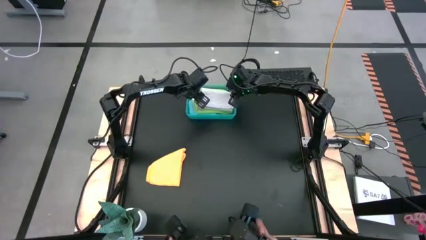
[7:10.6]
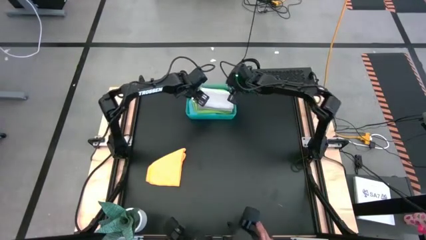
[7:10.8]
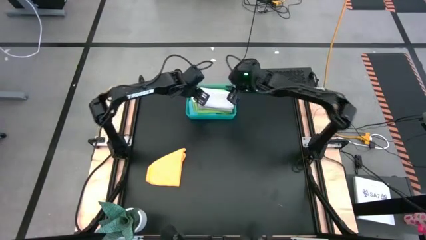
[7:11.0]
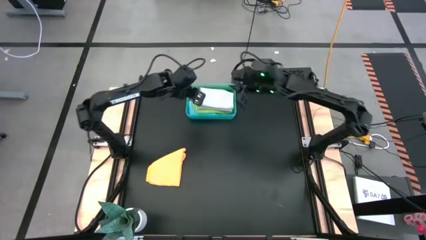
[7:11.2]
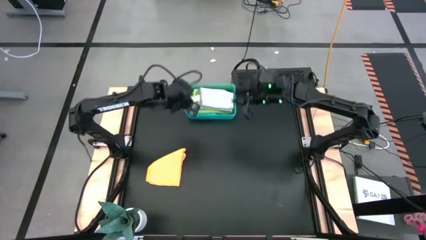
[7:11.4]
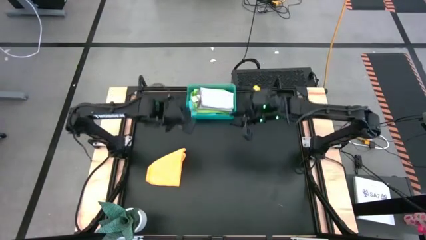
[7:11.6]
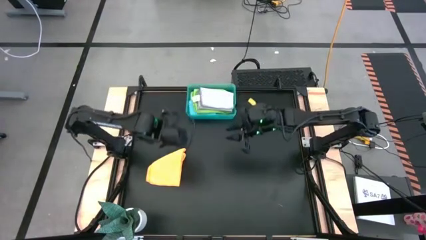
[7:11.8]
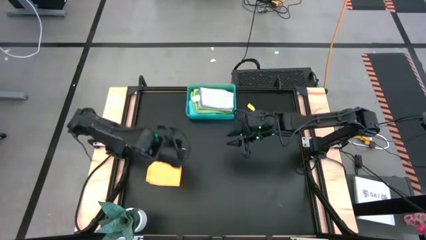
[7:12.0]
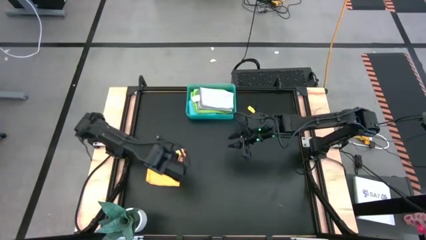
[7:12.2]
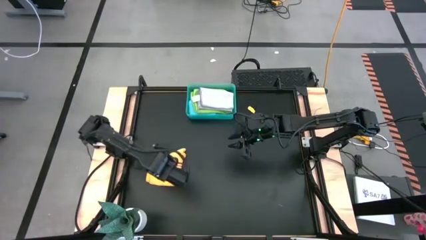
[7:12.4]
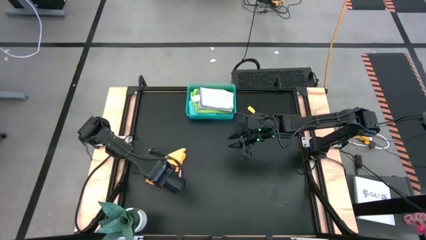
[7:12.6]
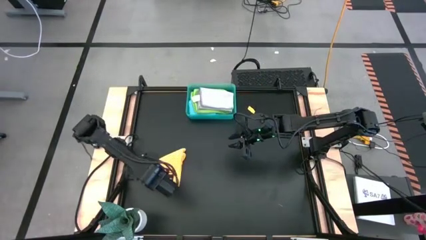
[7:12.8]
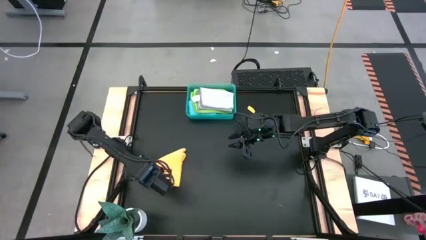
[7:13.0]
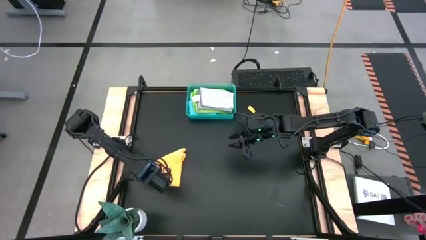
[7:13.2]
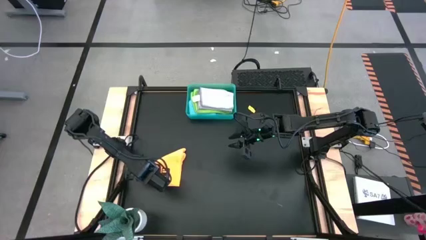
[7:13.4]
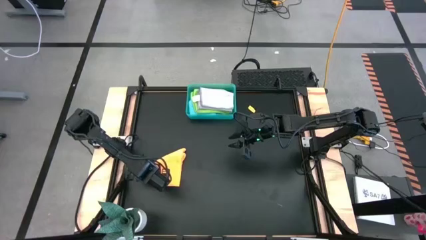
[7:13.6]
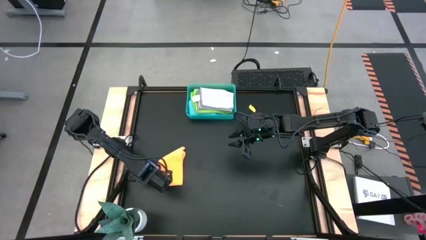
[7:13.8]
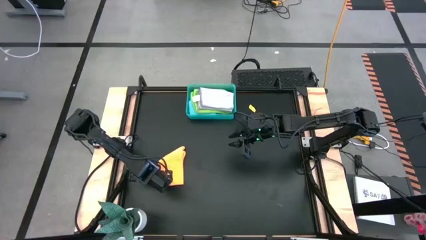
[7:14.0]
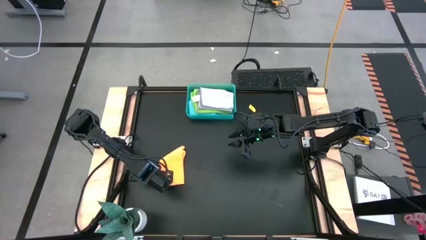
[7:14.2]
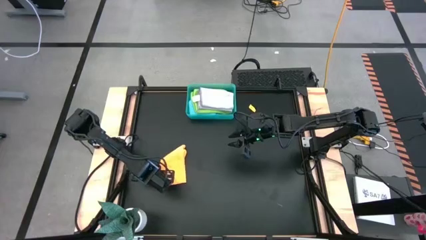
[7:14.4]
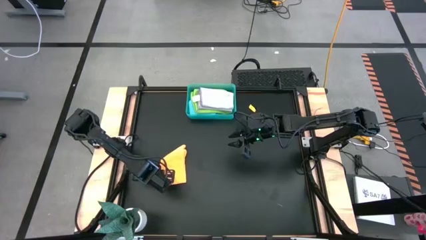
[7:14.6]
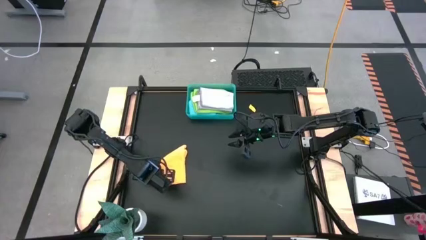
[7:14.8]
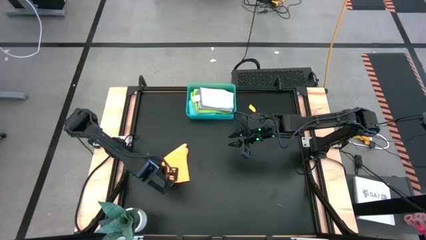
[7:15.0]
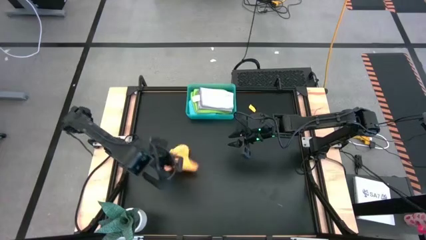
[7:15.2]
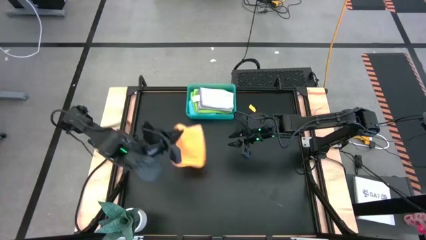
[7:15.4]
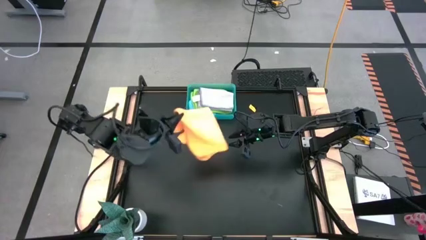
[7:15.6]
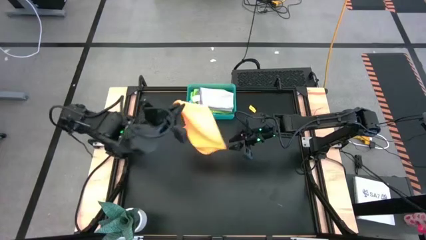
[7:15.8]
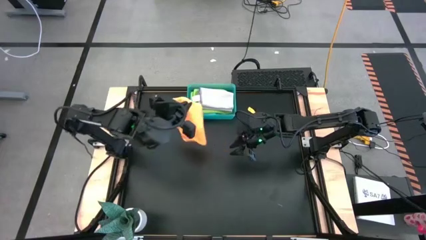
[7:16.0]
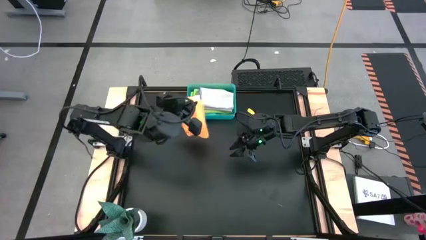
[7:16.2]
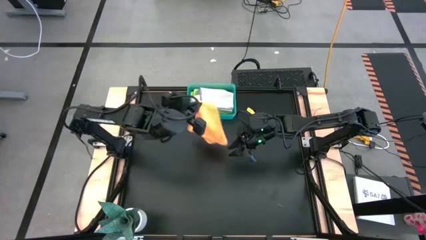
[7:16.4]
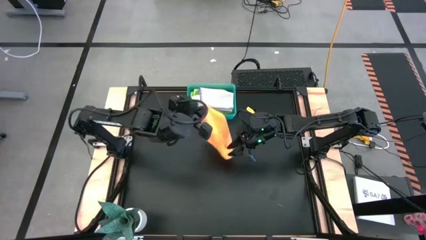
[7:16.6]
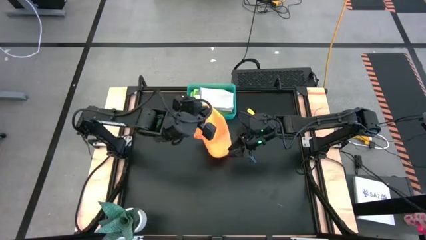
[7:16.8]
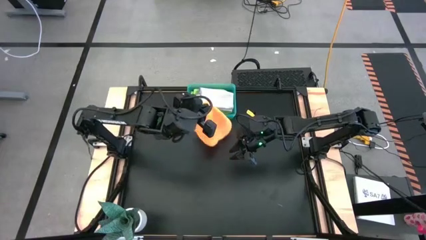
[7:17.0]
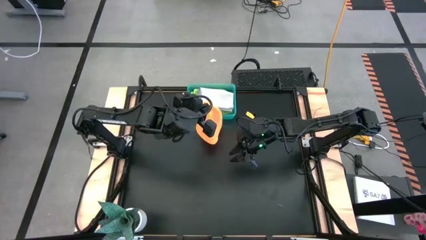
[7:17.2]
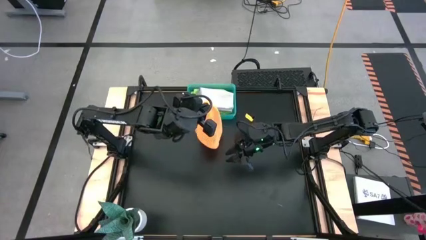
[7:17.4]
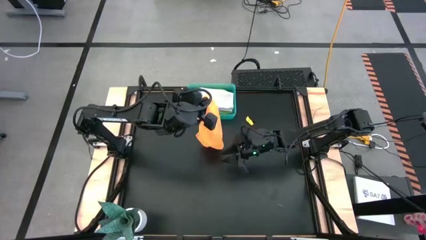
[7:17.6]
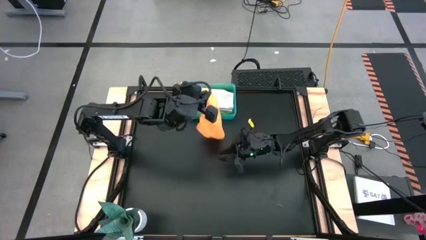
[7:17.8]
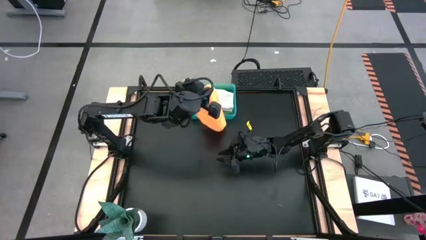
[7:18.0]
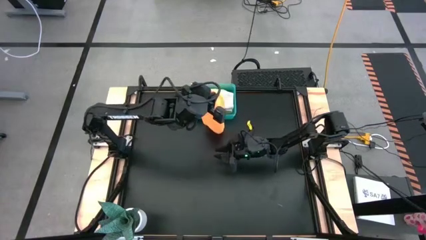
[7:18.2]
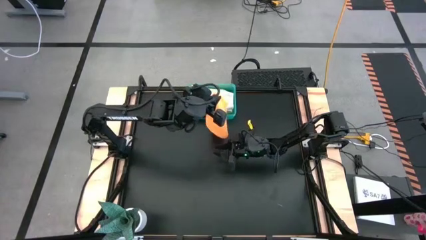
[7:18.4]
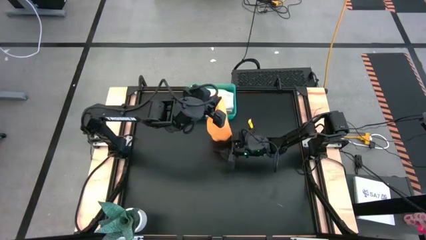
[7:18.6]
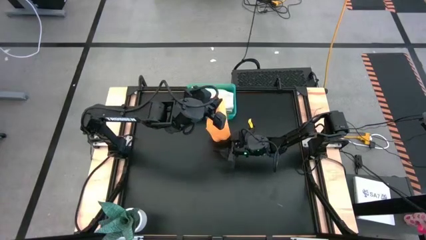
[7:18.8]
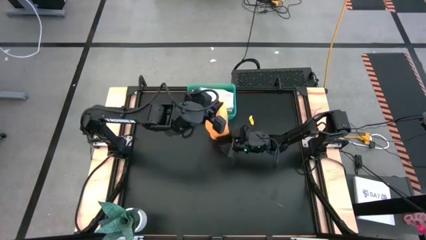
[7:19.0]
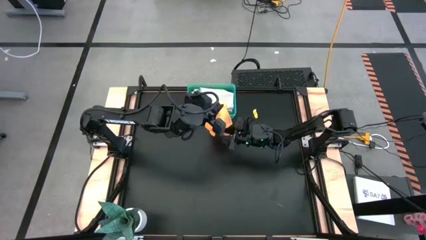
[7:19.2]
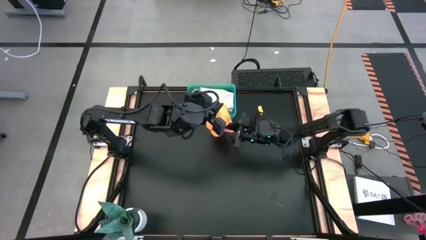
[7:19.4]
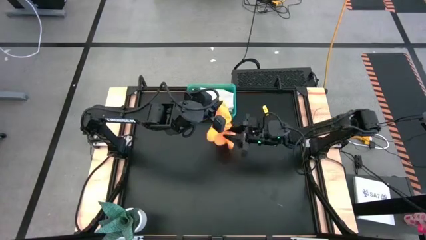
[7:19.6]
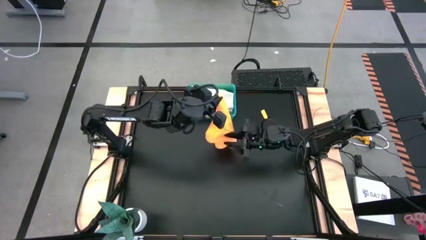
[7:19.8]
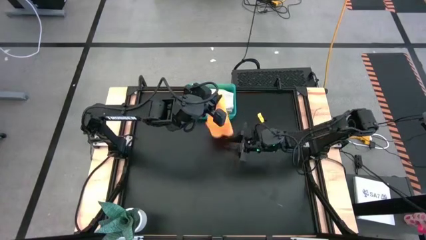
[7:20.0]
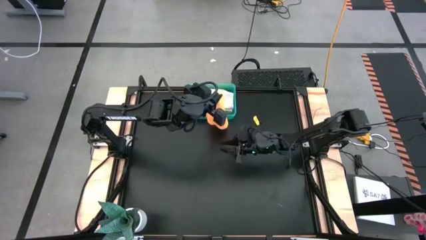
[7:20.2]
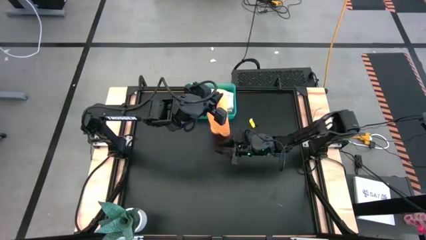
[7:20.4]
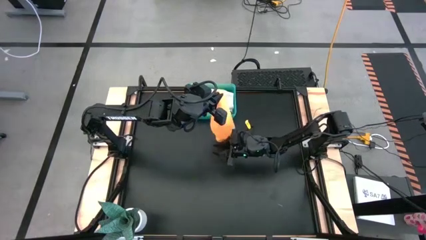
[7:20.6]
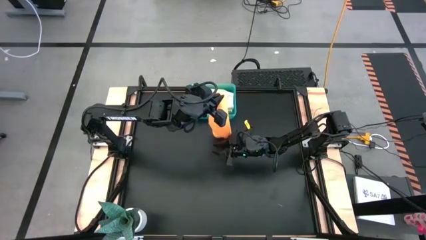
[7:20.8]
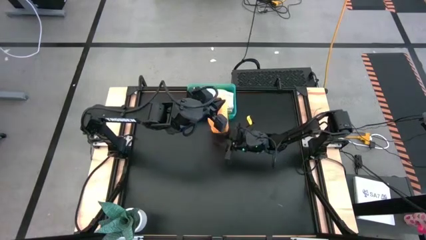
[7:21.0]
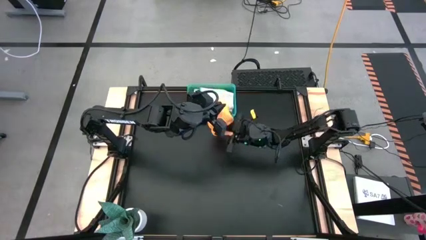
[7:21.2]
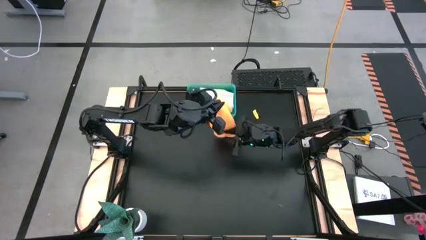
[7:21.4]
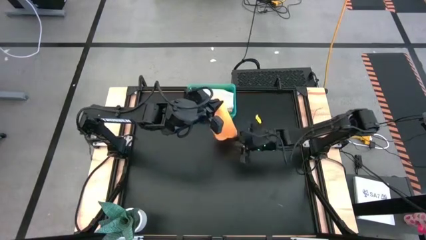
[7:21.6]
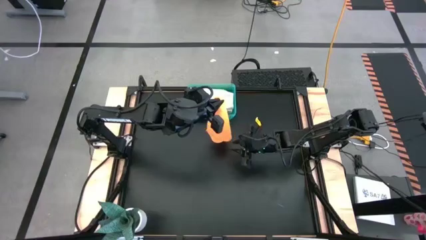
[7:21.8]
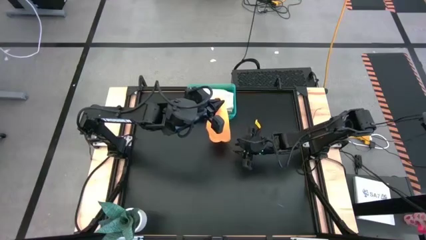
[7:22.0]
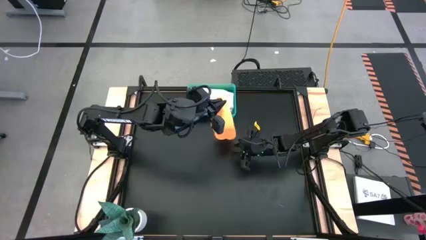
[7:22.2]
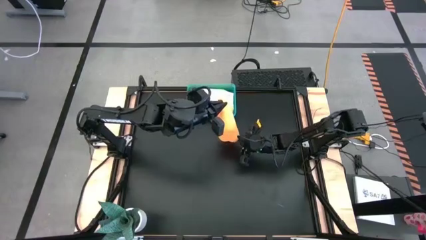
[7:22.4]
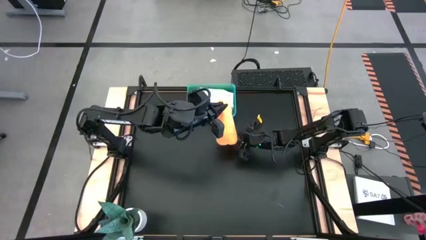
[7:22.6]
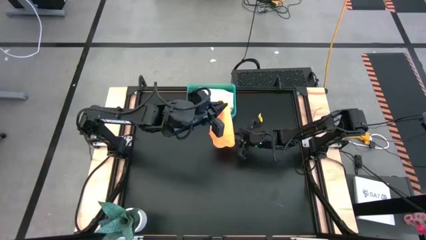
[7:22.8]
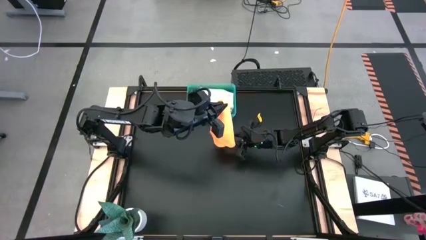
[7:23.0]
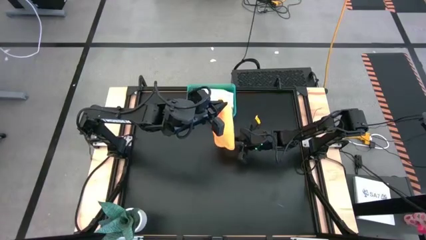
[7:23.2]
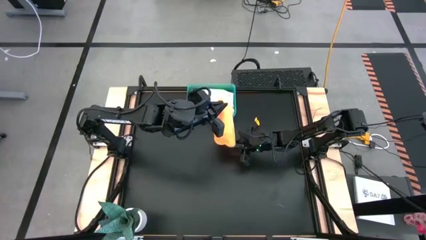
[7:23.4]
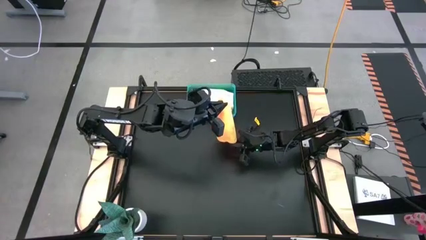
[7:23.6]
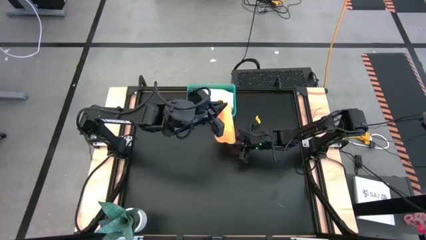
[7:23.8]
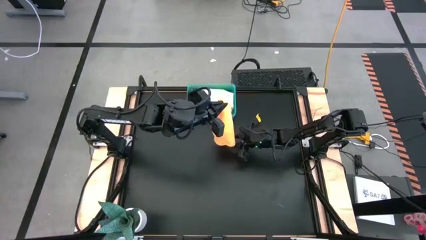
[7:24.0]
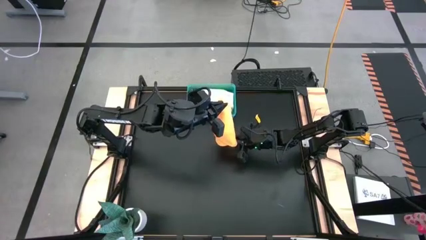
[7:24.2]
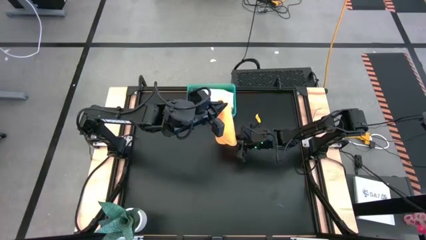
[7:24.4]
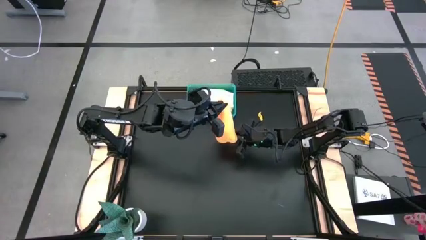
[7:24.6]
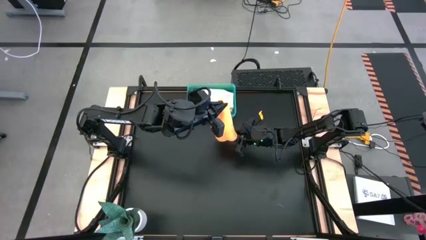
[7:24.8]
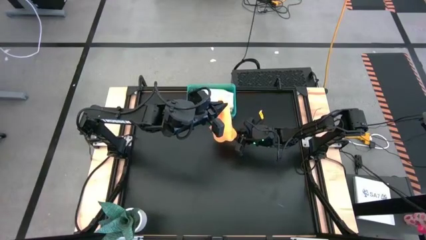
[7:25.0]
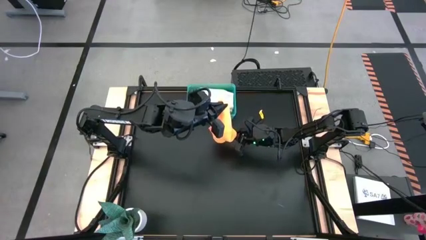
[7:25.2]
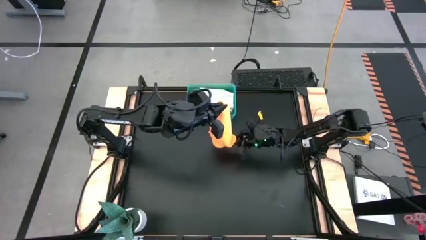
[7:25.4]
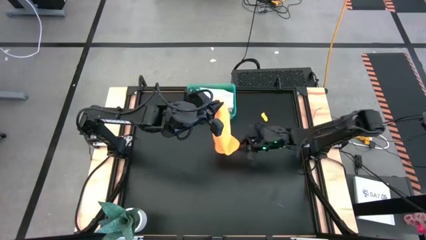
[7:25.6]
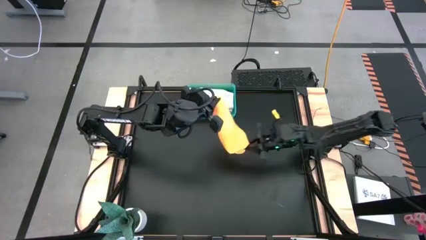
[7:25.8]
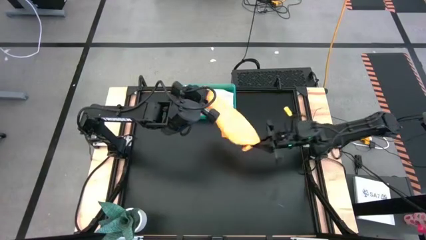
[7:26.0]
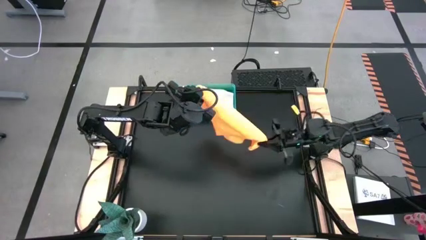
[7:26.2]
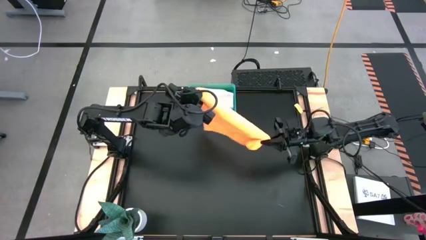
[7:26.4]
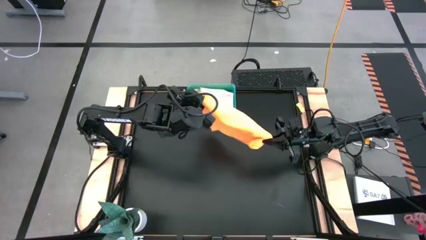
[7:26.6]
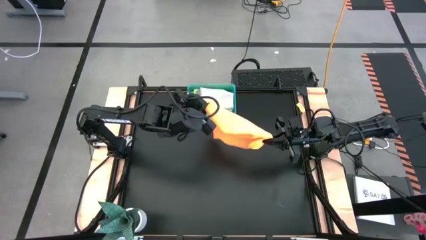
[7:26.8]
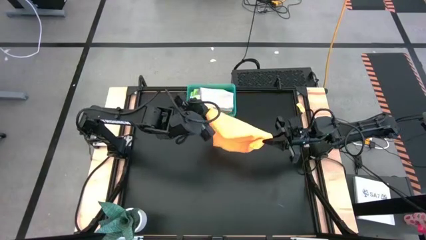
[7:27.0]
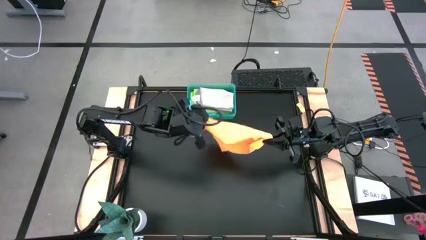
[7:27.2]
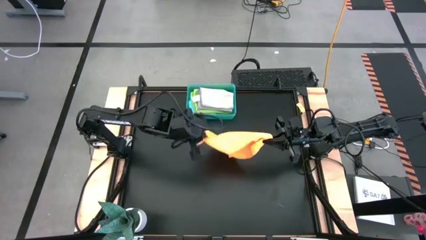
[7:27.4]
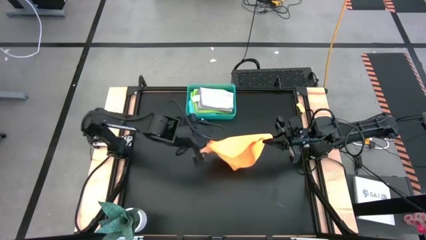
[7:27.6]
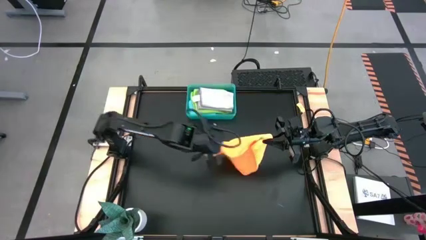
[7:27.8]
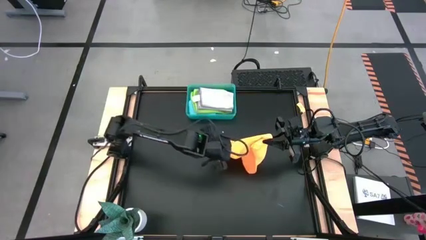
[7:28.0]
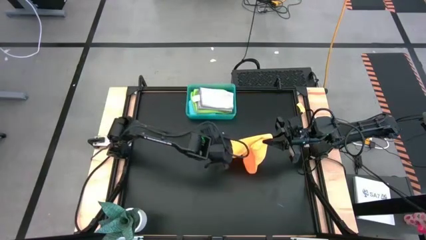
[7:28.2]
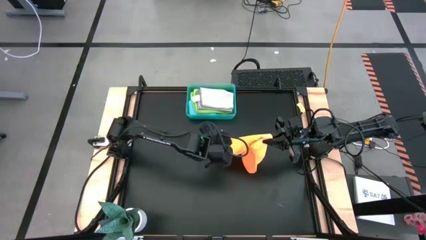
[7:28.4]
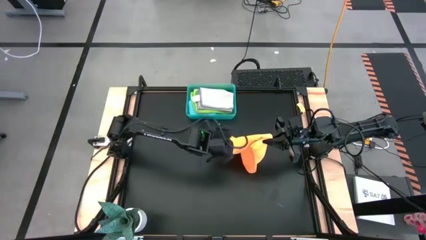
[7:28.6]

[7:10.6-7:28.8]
Task: Fold microfiber towels
Fold the orange microfiber towel
